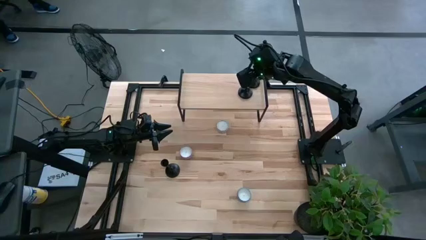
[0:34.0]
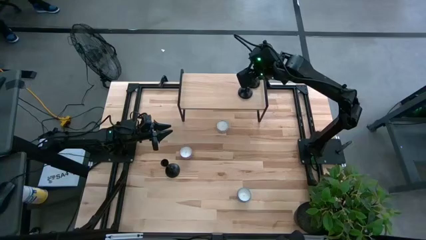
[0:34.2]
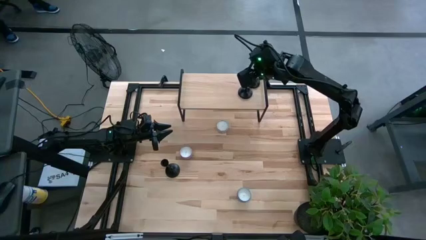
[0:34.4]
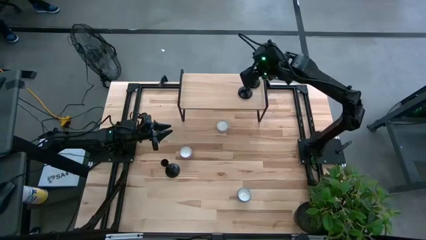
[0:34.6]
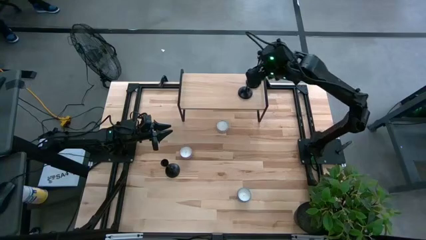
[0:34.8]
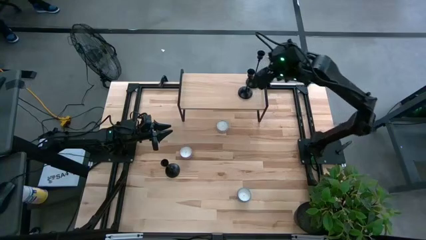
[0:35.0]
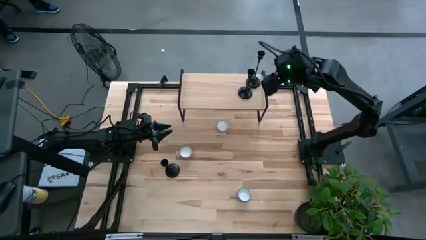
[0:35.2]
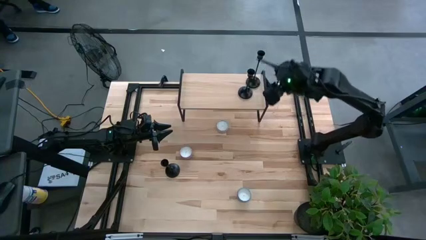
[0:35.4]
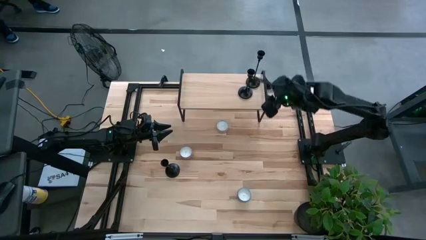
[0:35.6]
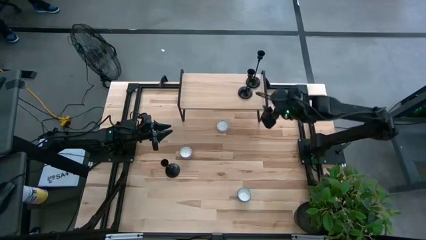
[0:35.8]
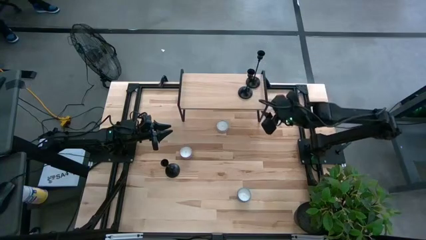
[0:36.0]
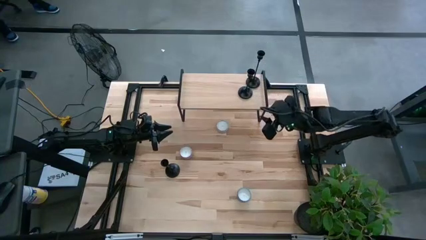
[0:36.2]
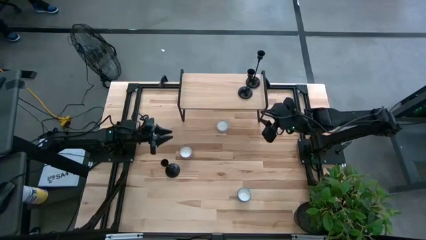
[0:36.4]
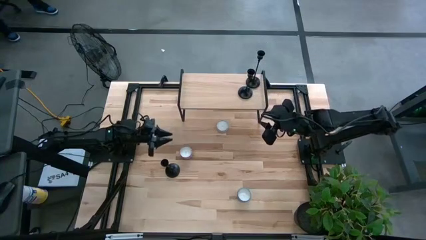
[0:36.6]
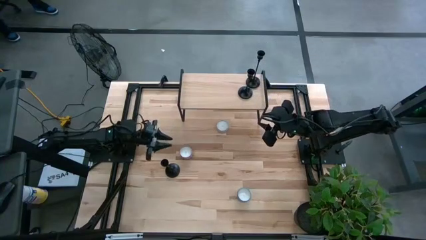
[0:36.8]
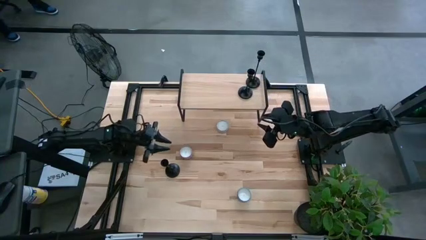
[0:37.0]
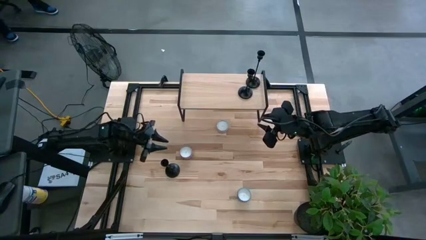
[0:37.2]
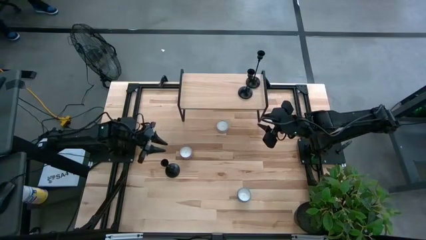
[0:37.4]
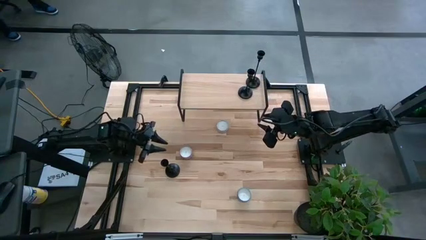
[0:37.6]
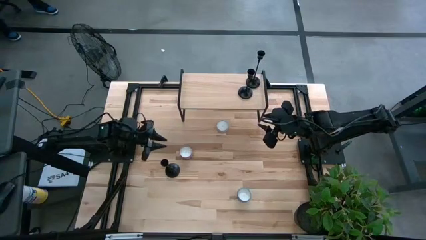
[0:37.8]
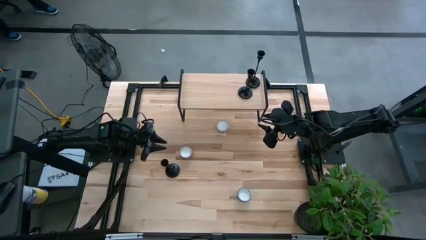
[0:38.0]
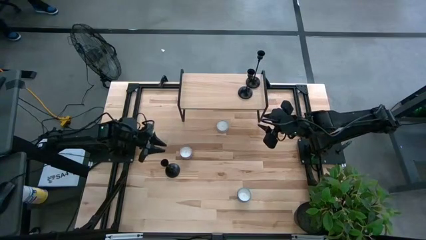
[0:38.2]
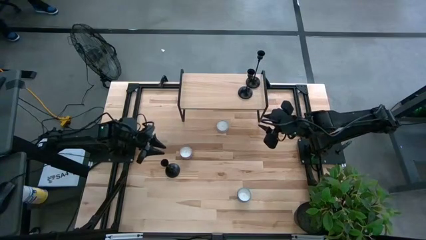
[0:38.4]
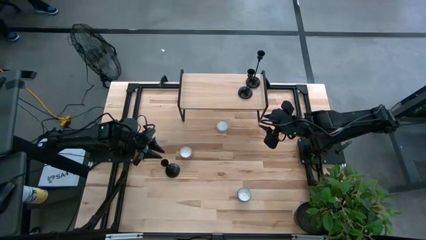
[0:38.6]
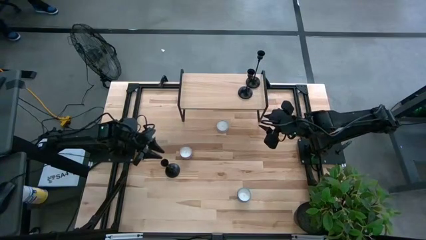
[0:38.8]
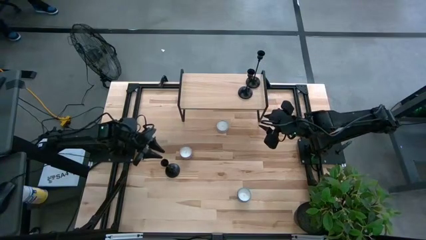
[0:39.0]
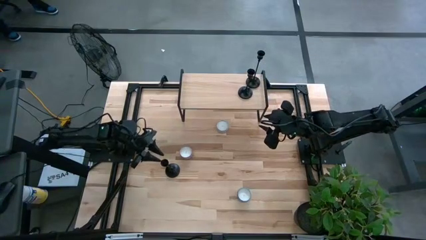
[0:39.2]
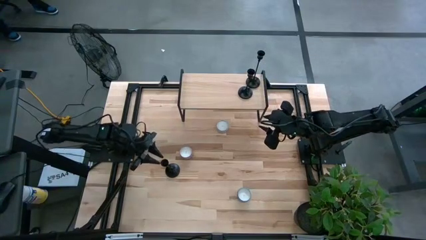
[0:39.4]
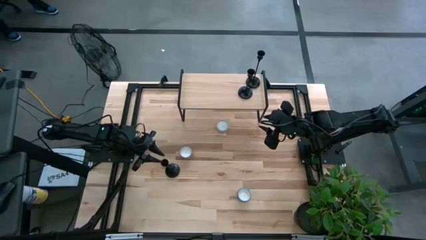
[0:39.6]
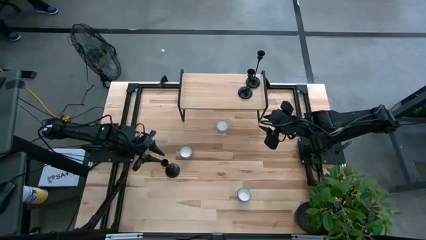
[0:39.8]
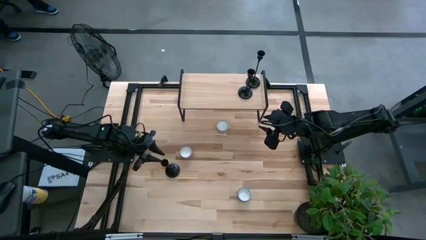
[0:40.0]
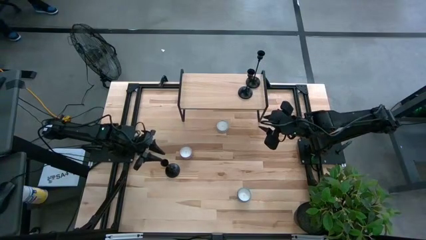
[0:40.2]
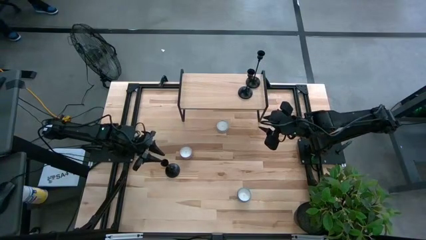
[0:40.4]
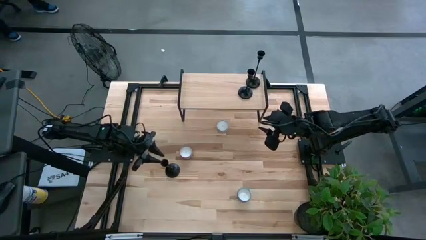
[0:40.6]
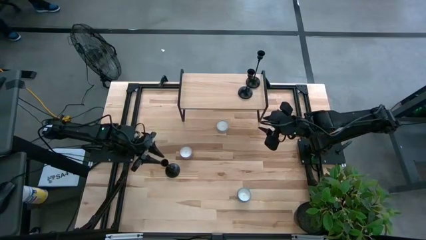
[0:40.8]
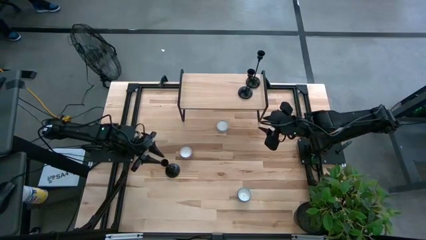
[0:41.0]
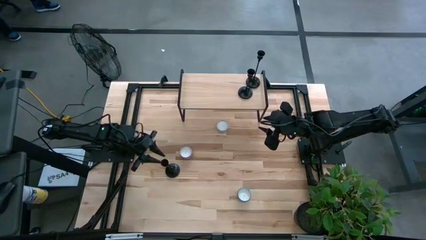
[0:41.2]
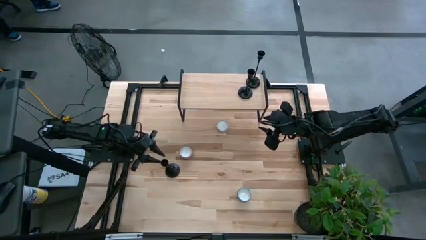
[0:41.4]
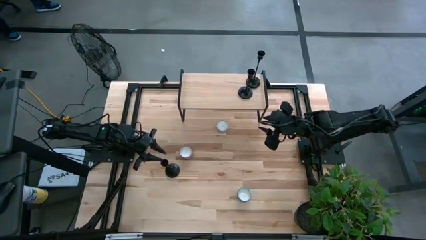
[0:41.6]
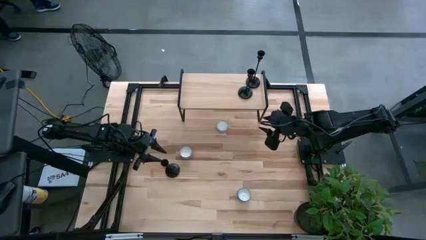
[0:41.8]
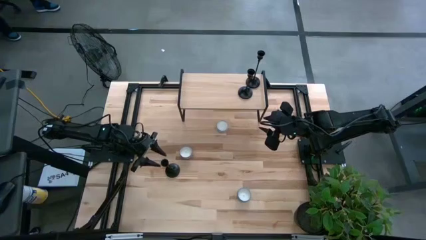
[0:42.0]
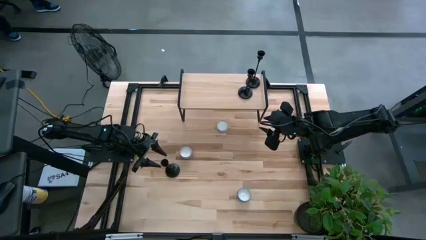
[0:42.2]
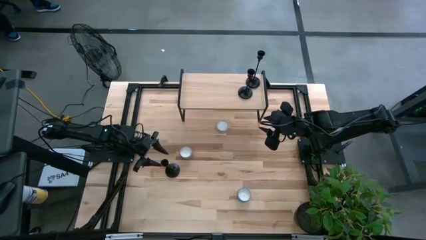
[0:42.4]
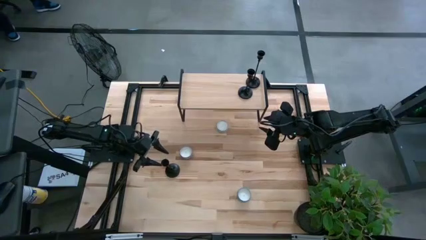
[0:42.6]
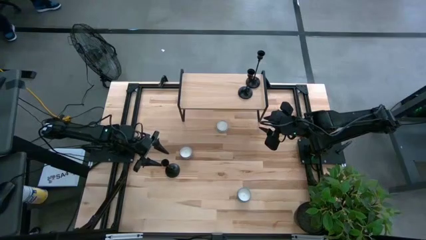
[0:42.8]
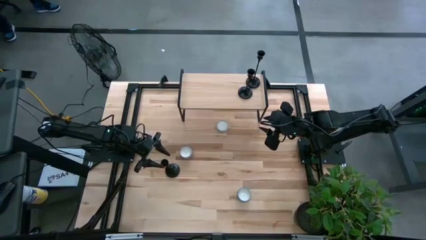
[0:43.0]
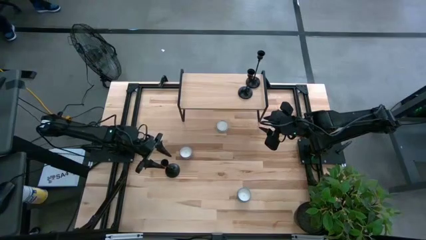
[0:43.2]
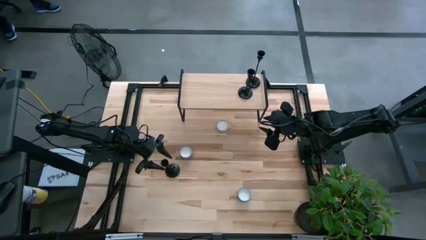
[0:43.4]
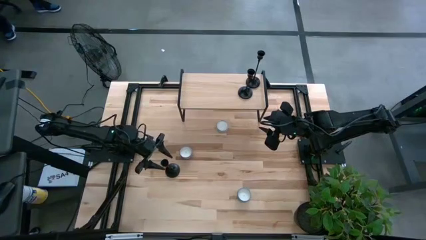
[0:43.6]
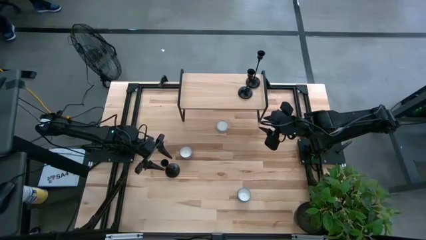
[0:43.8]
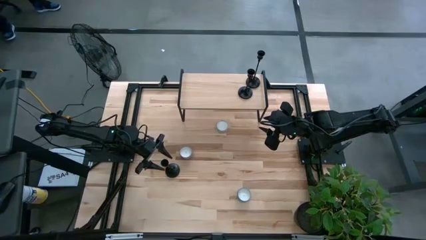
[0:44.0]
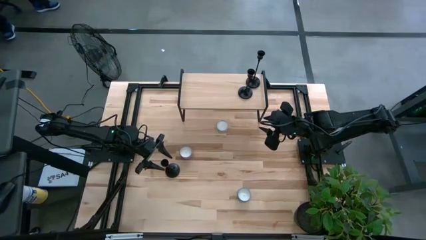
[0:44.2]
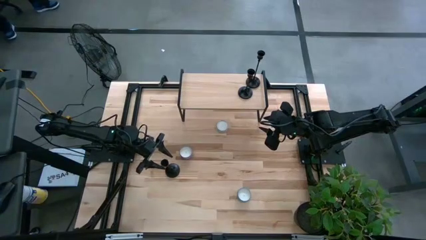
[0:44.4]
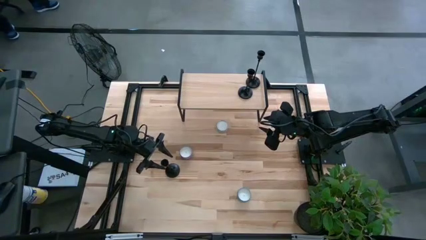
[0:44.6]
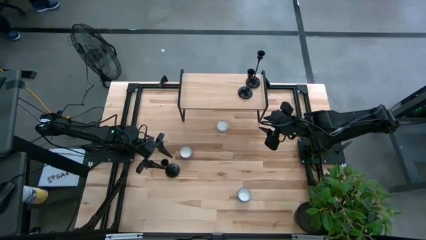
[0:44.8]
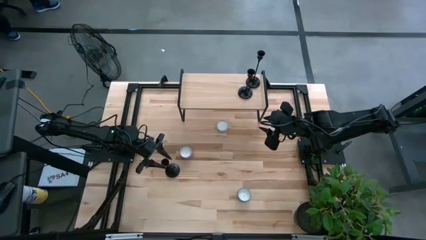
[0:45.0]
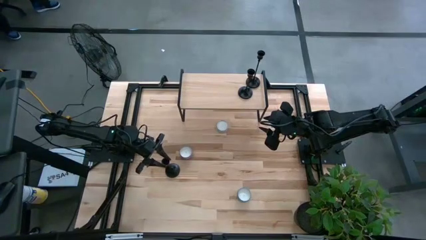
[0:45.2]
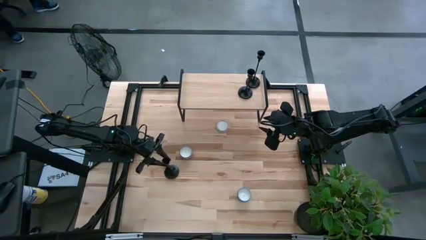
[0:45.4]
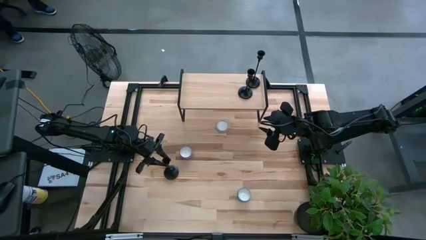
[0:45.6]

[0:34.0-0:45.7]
Task: Pick & Place candle stick holders
Put the black candle holder on the shelf
